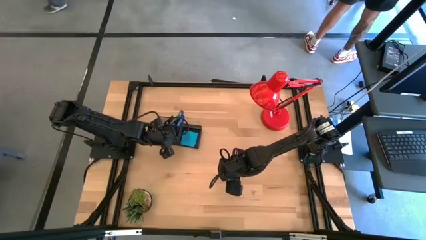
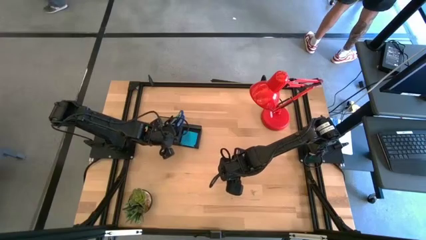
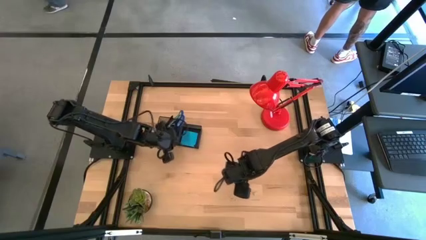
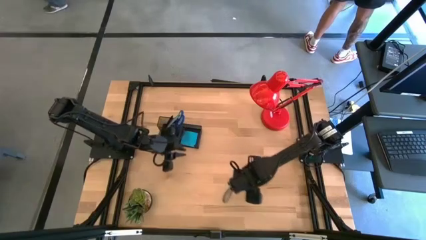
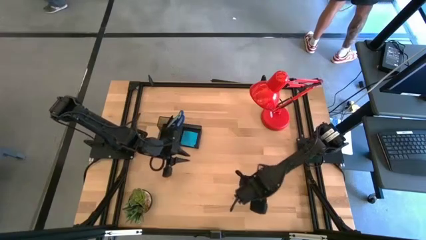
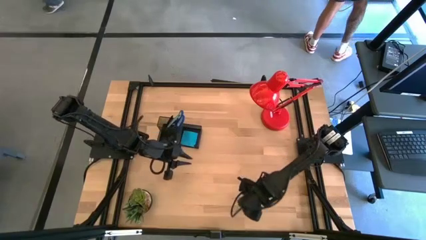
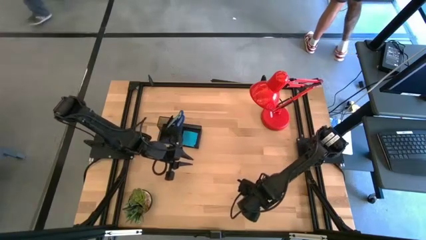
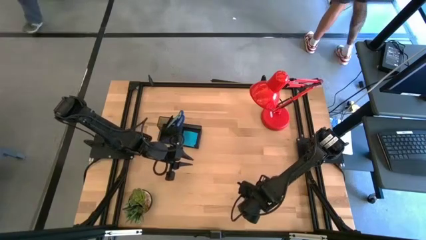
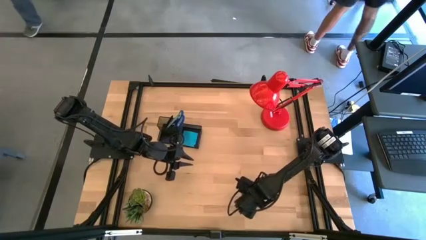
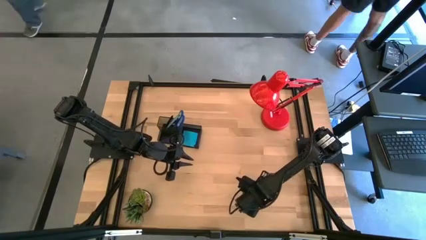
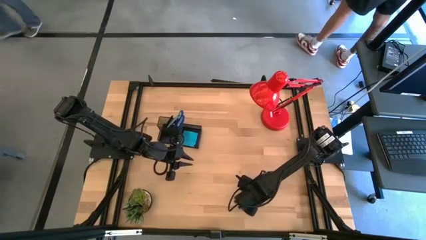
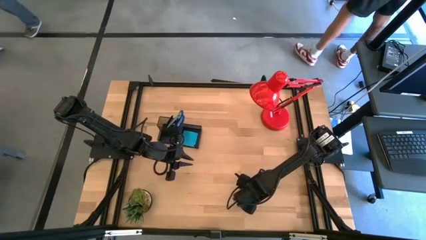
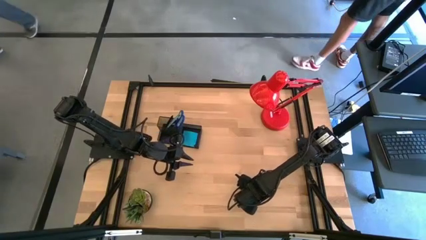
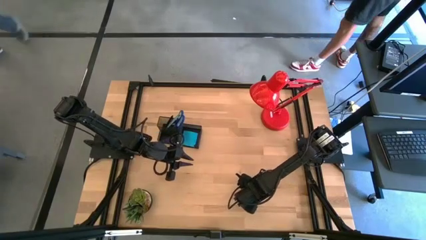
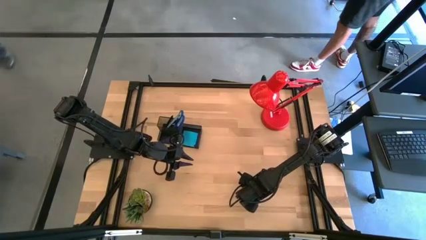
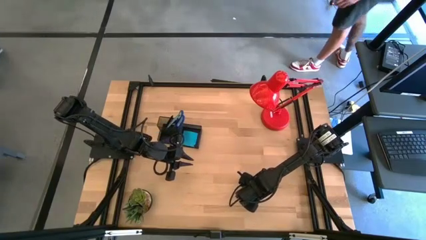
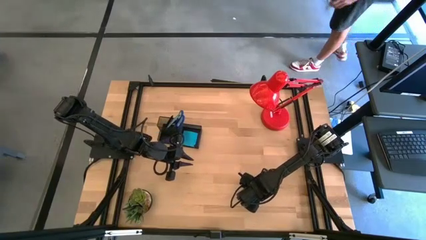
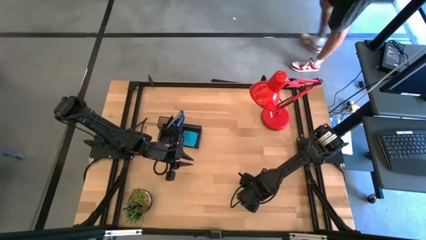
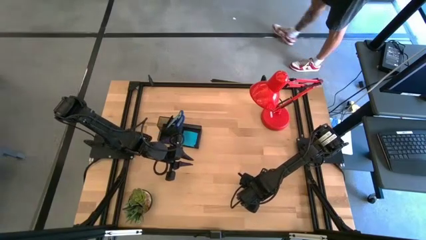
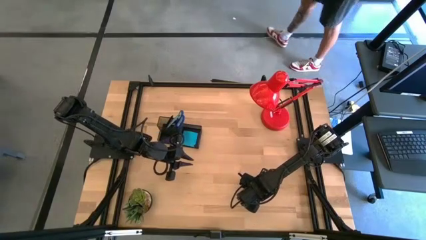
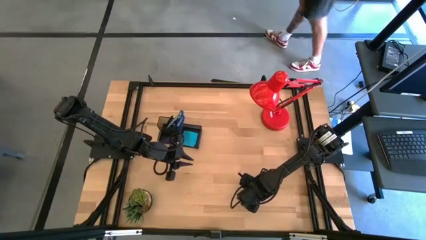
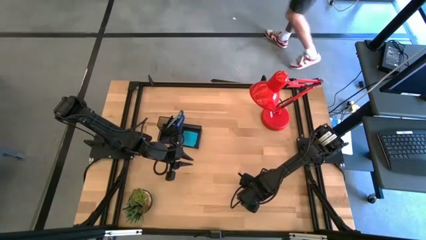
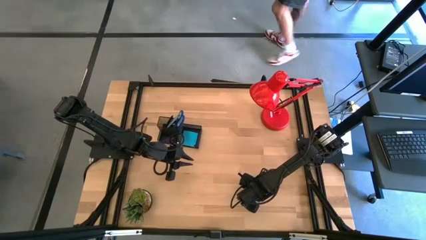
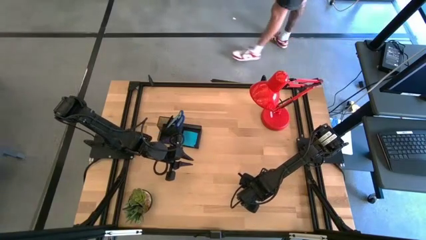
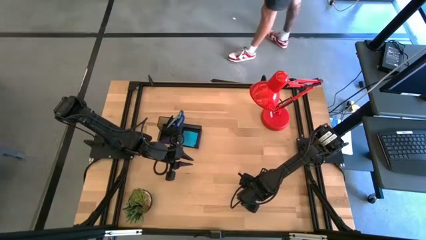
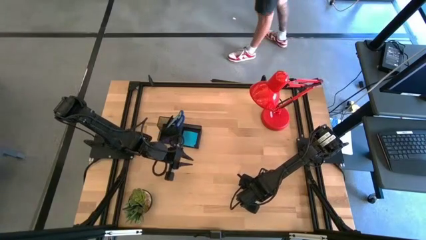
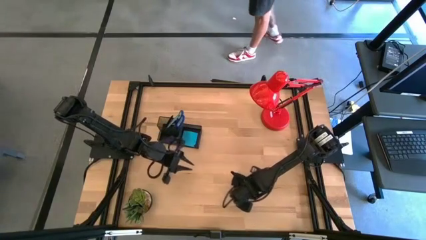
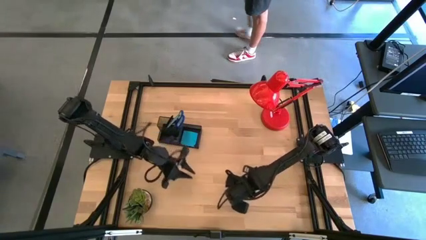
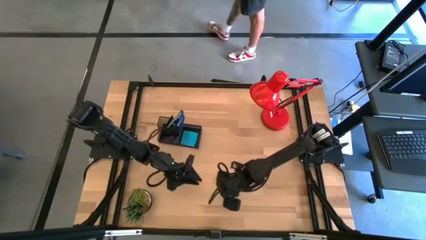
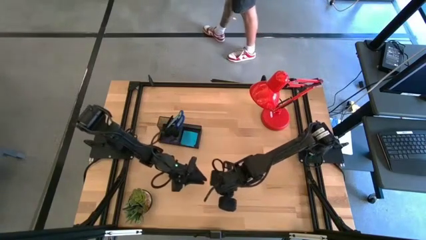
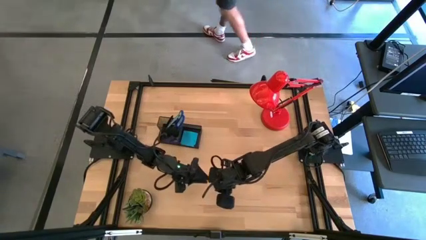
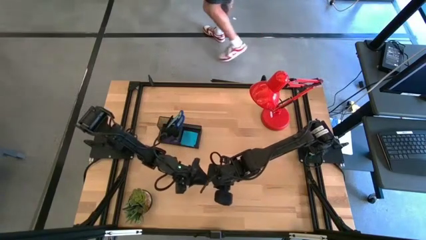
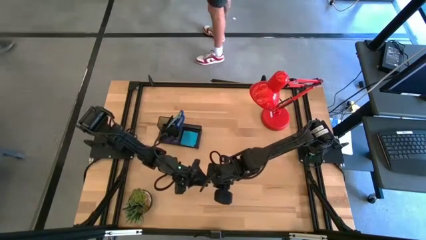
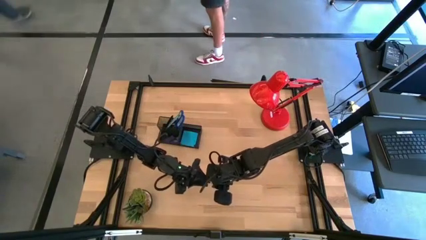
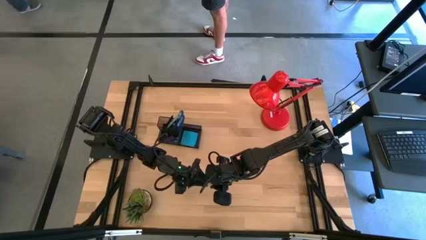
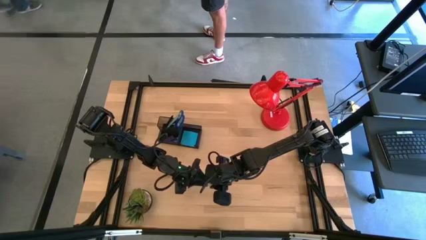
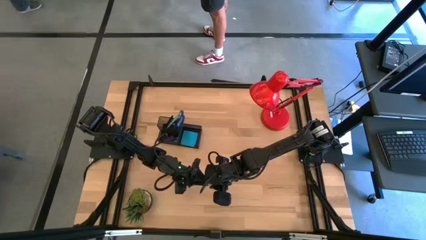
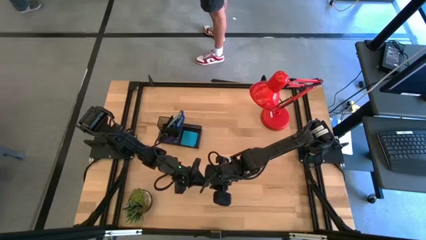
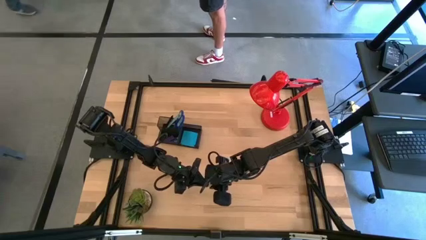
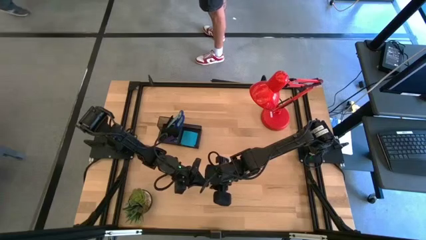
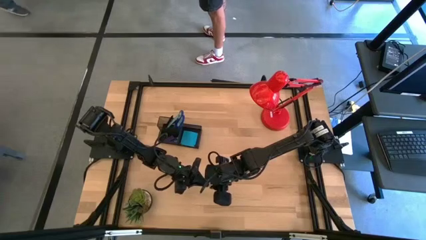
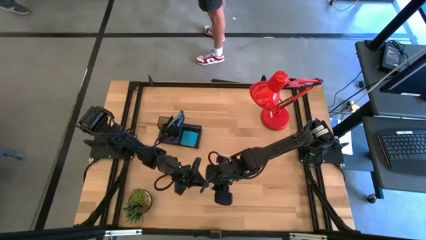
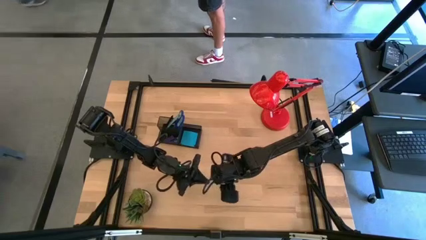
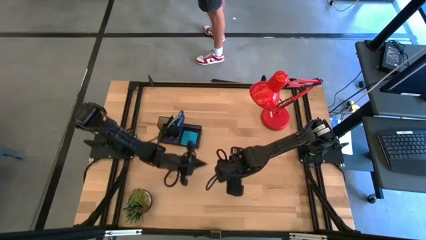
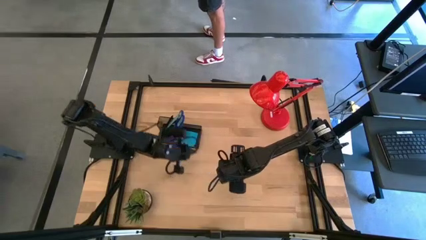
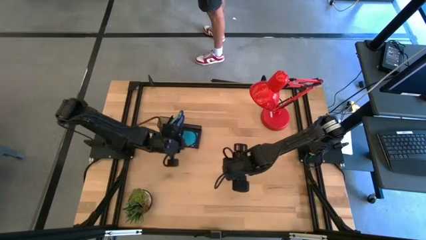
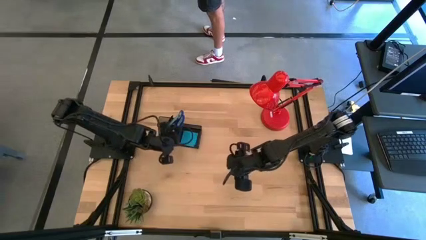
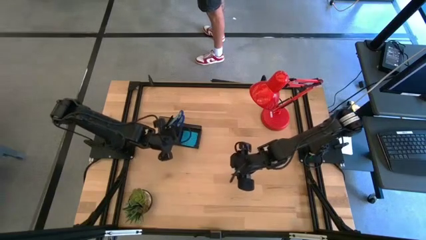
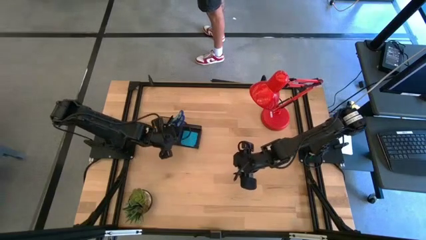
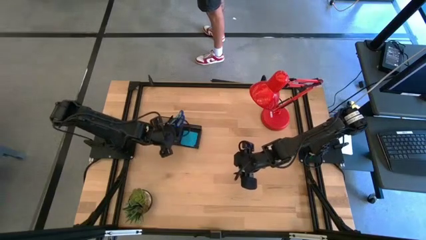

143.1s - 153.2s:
Task: Pick and place office supplies into organizer
Put the brown binder clip into the black desk organizer

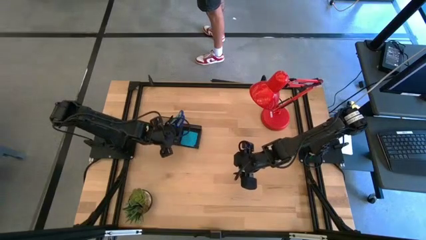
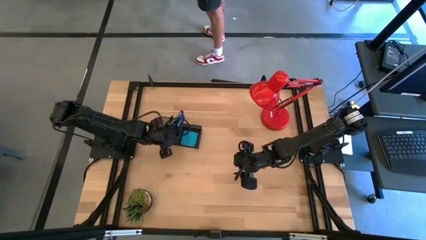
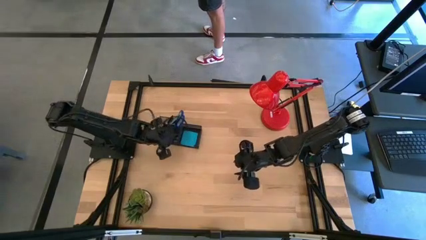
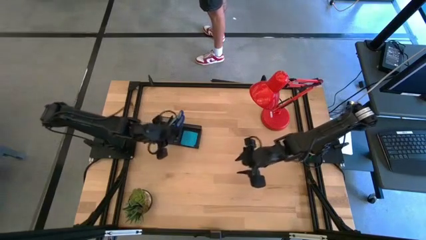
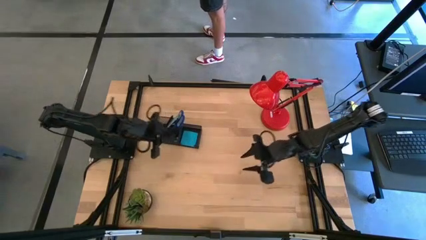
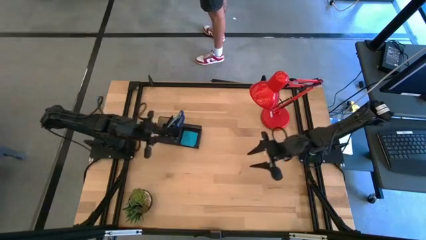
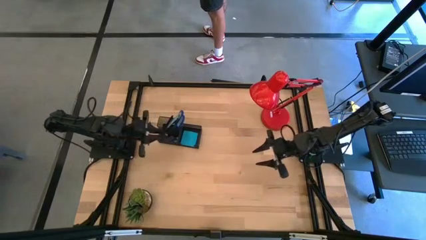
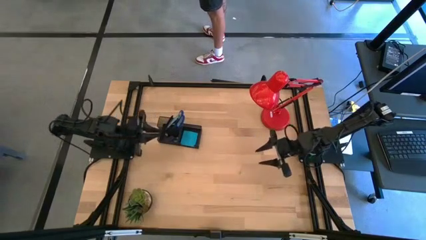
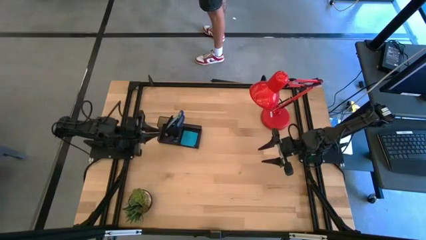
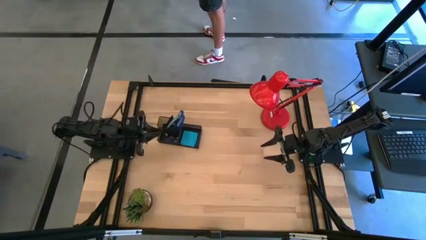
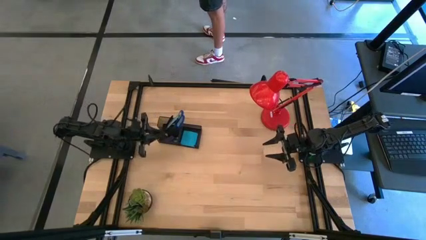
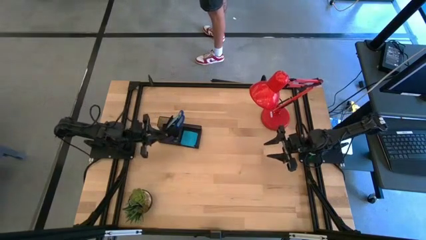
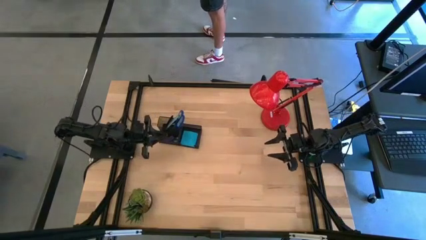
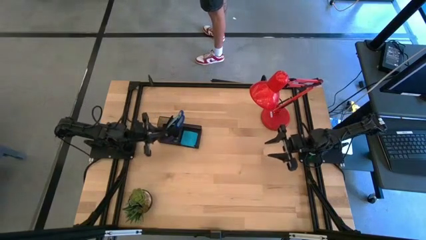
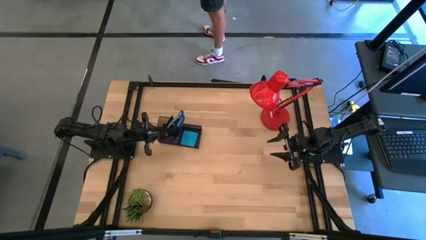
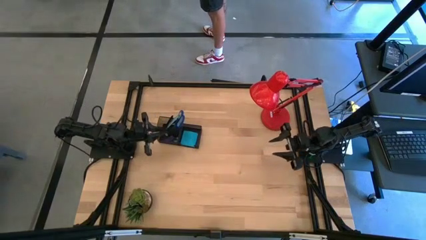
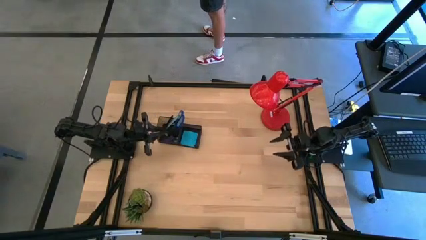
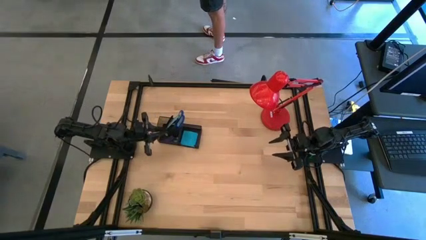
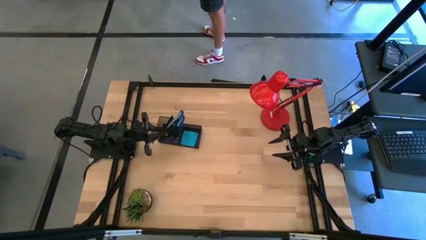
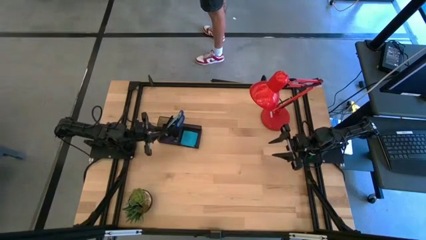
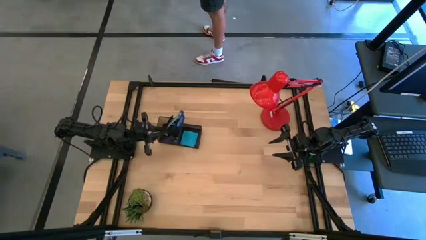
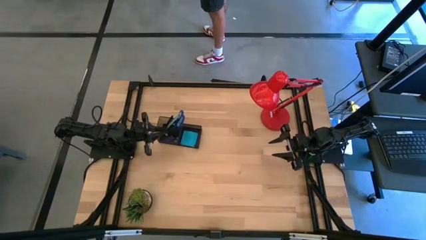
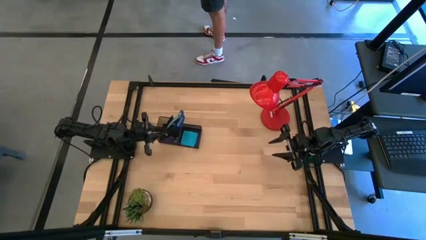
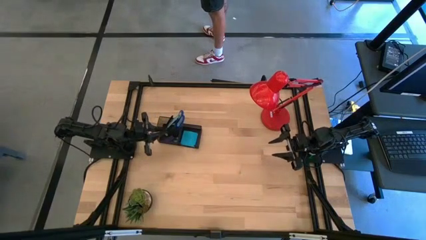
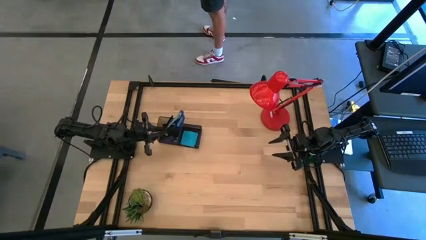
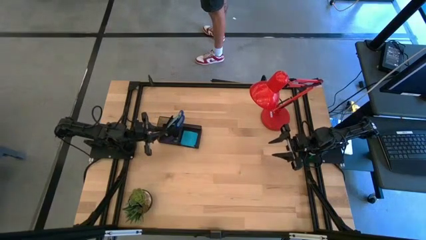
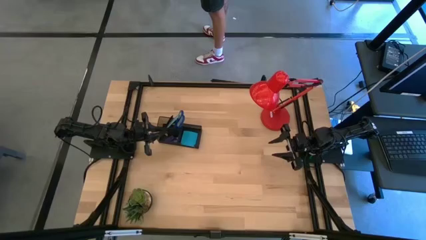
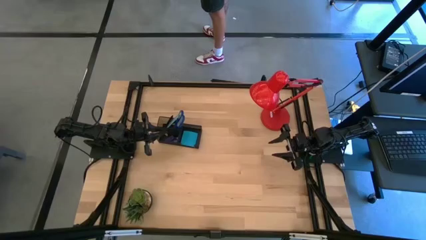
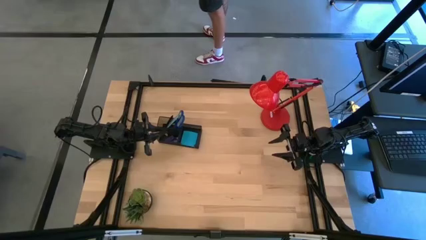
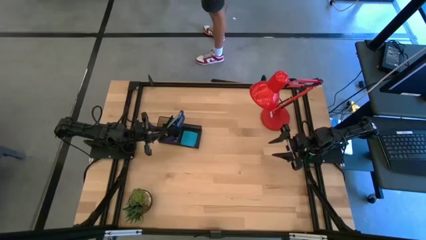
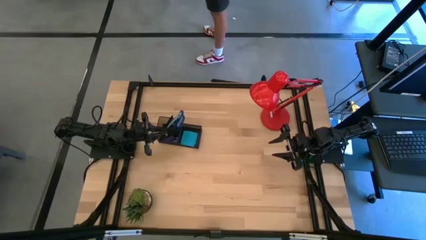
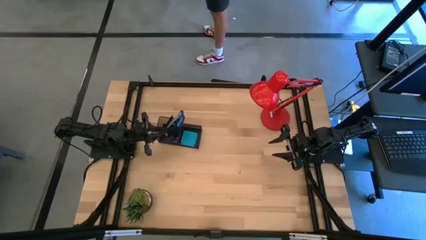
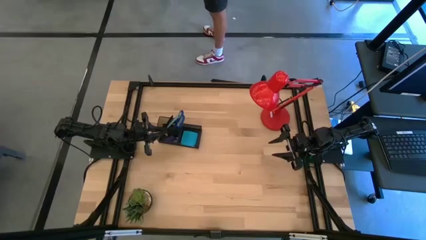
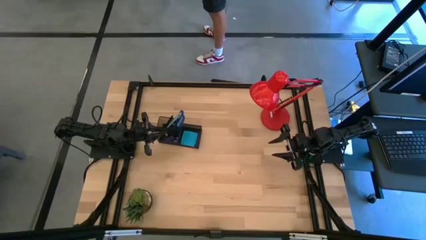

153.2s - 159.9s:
Return to Home Position
